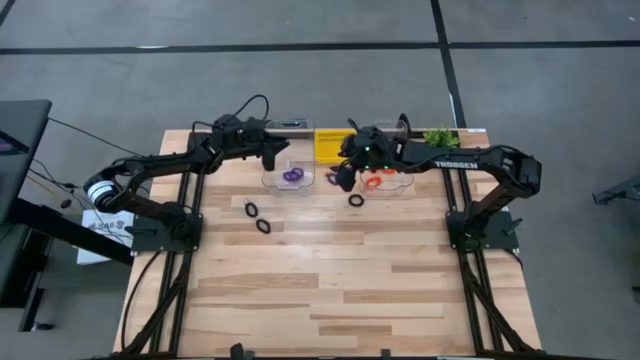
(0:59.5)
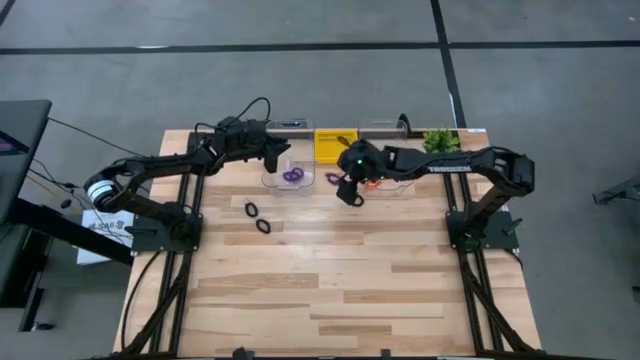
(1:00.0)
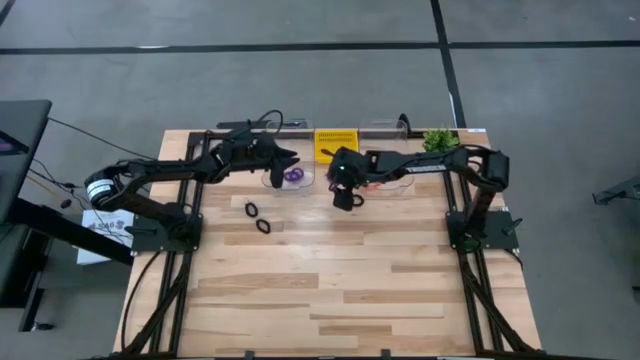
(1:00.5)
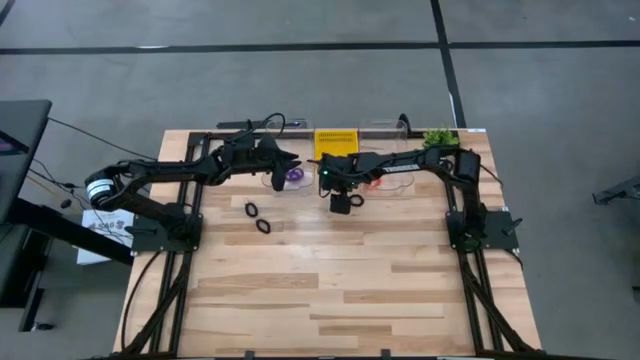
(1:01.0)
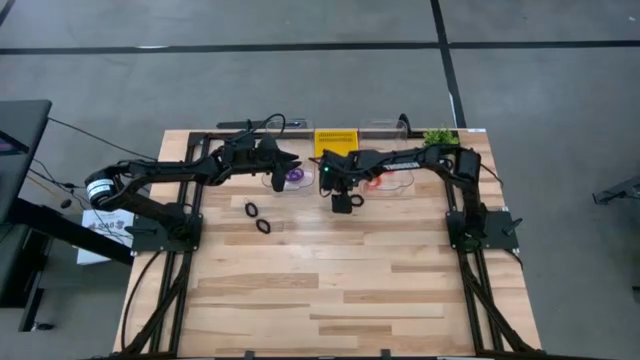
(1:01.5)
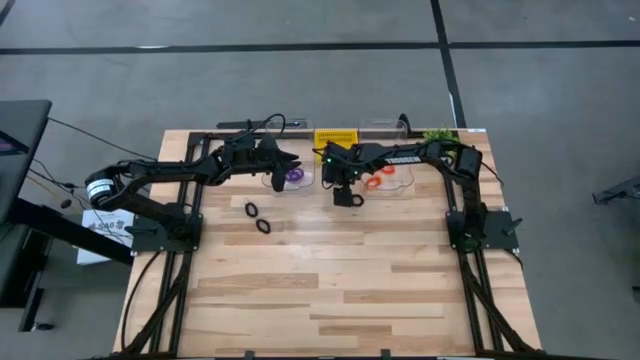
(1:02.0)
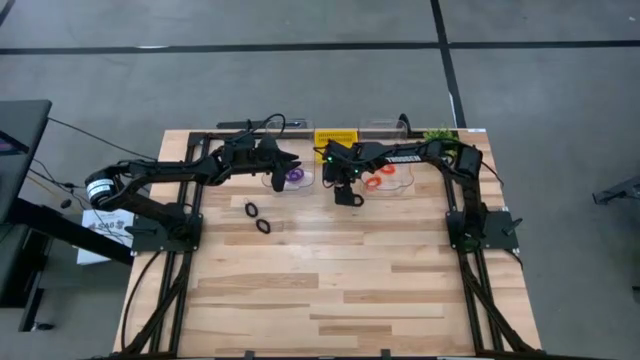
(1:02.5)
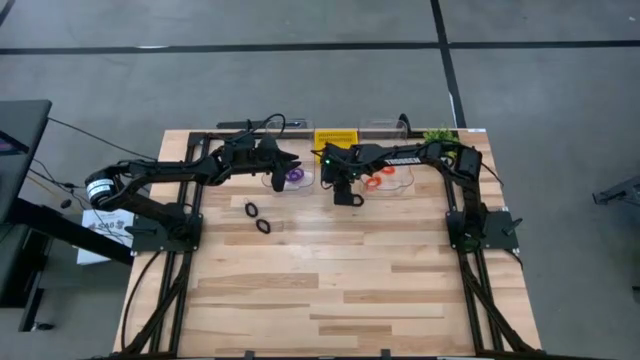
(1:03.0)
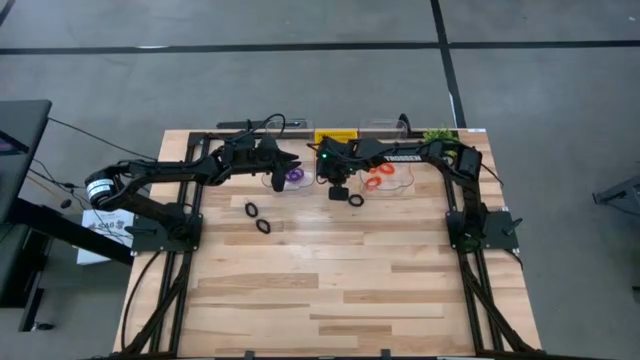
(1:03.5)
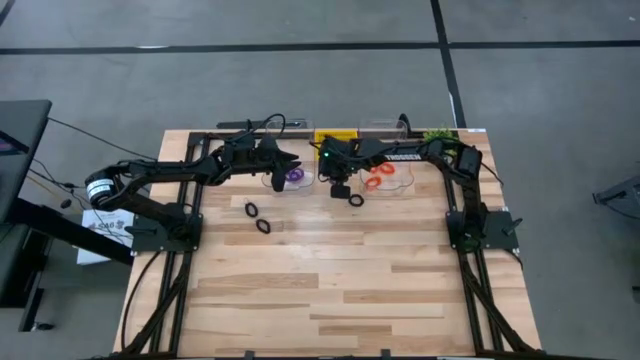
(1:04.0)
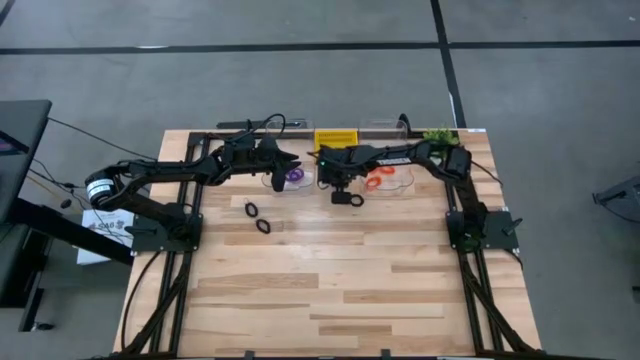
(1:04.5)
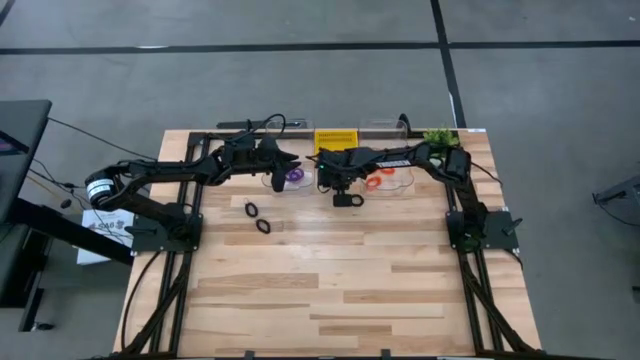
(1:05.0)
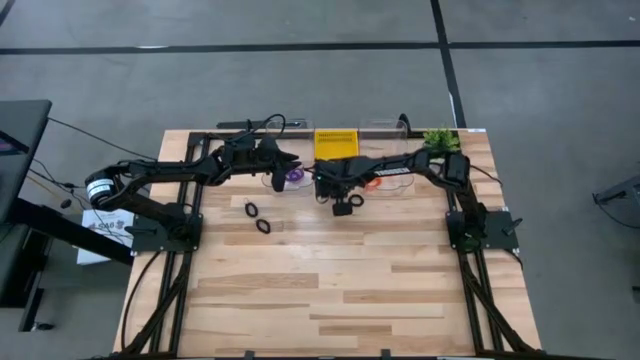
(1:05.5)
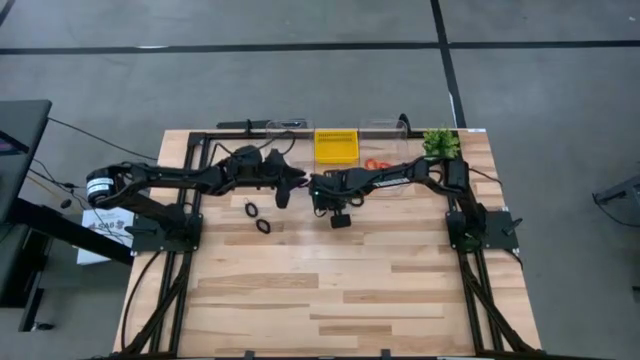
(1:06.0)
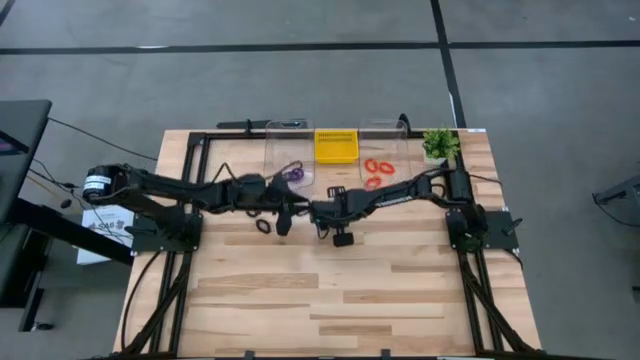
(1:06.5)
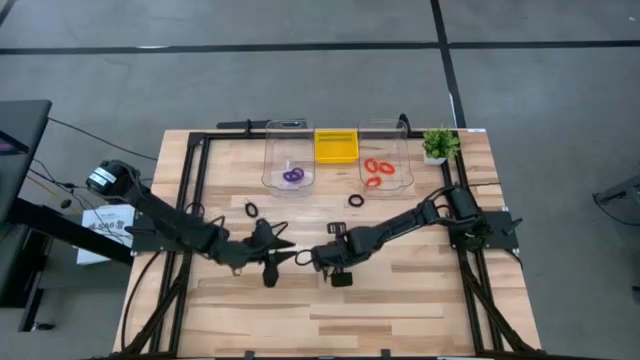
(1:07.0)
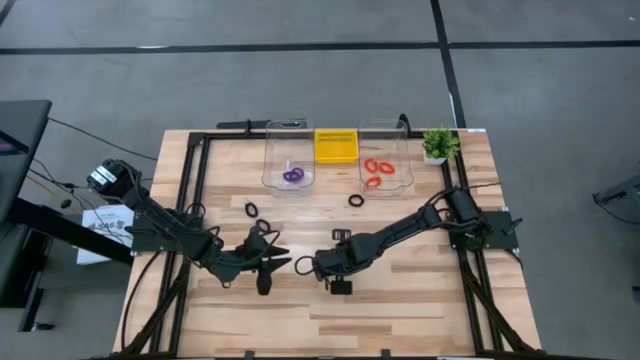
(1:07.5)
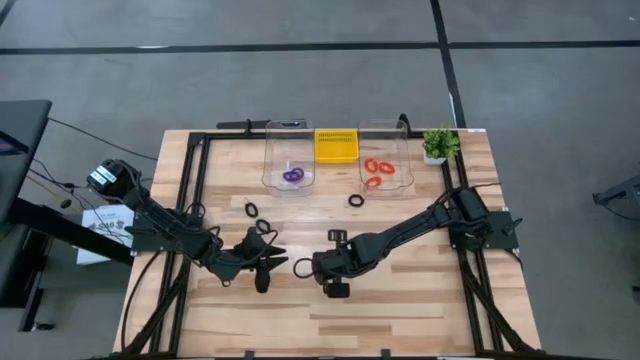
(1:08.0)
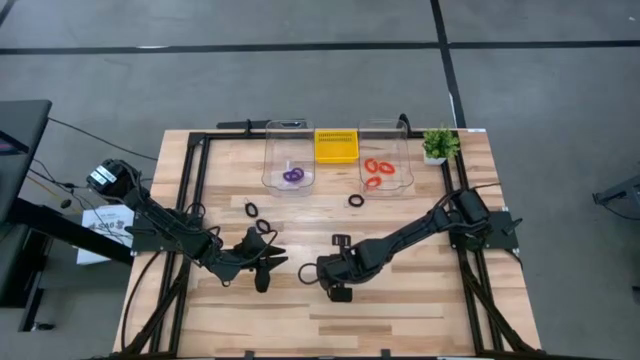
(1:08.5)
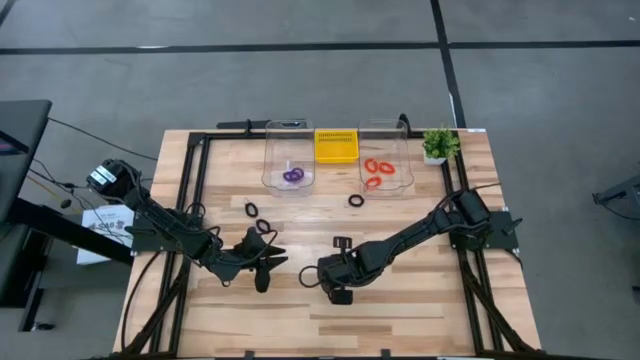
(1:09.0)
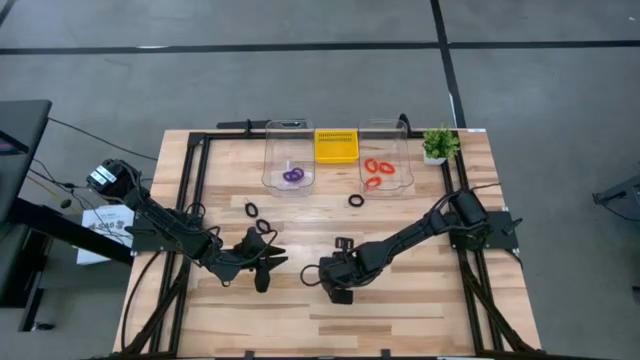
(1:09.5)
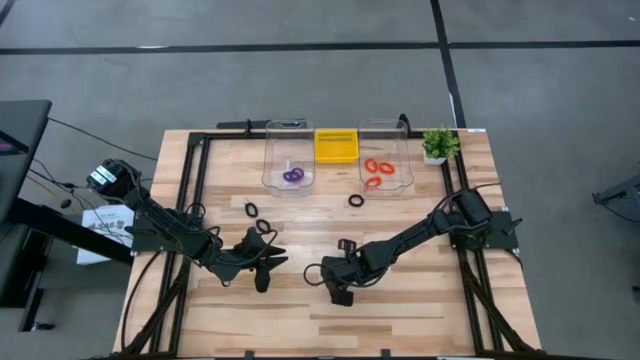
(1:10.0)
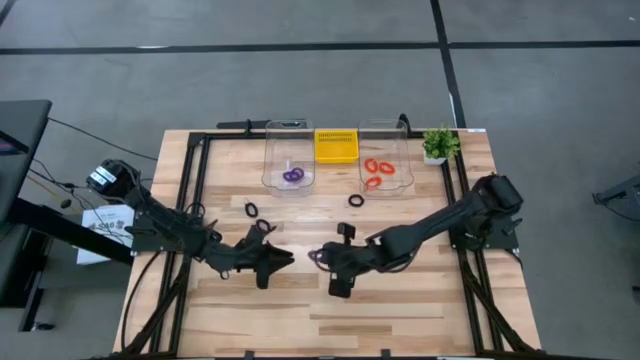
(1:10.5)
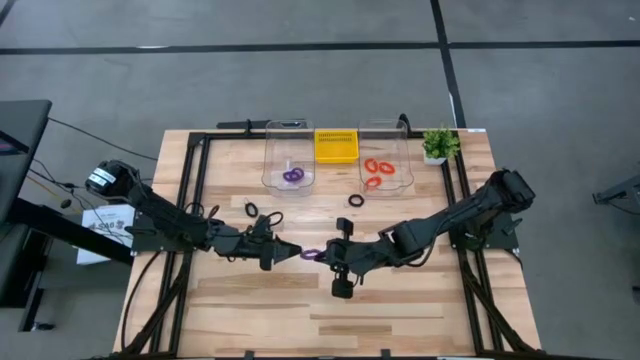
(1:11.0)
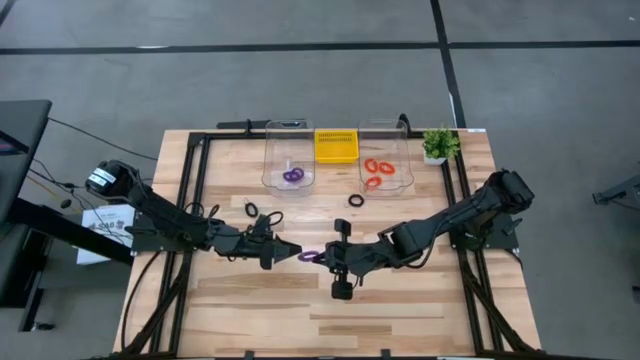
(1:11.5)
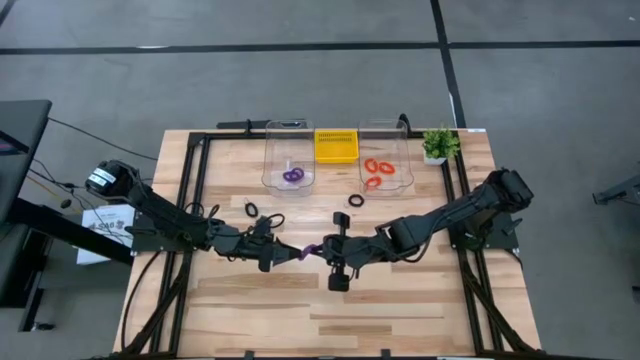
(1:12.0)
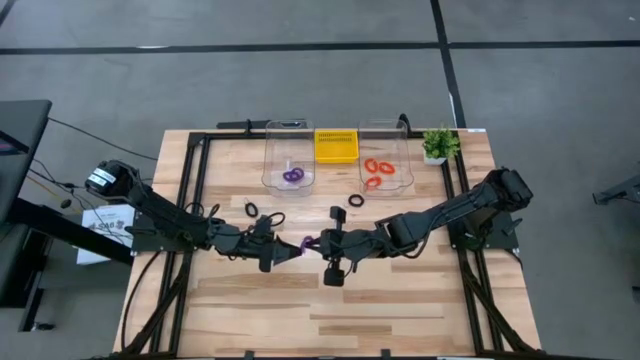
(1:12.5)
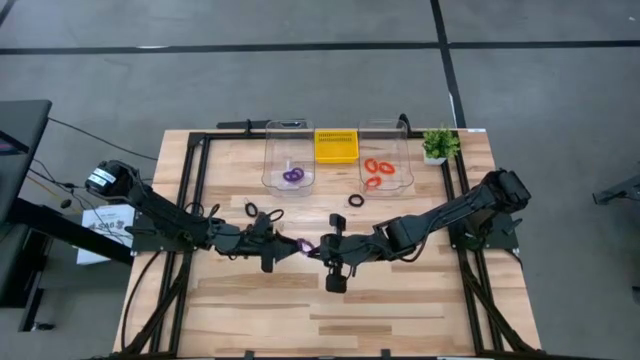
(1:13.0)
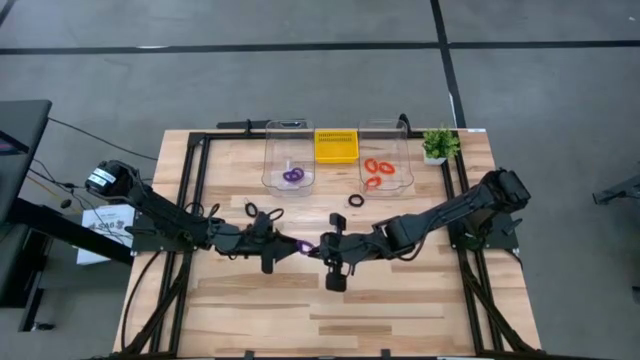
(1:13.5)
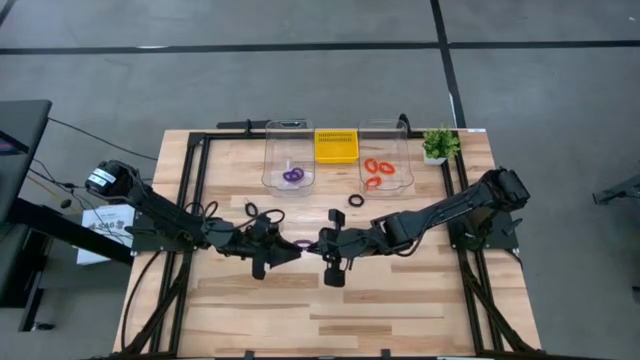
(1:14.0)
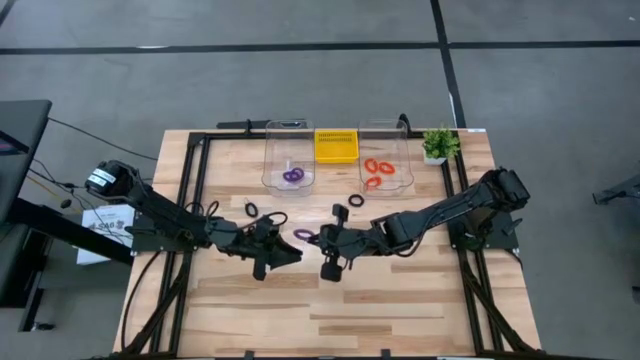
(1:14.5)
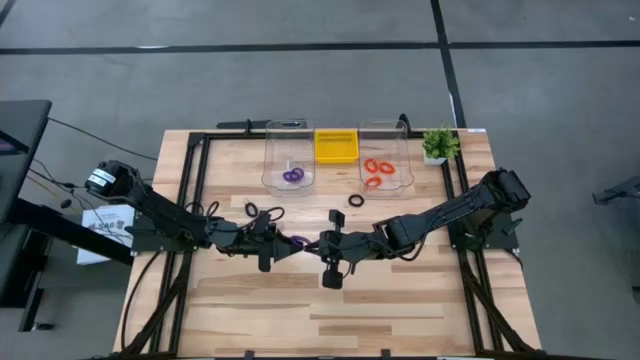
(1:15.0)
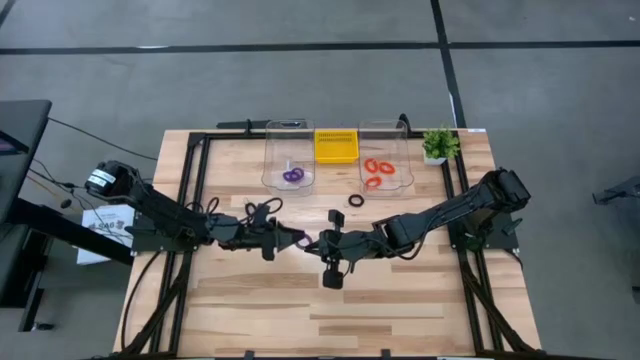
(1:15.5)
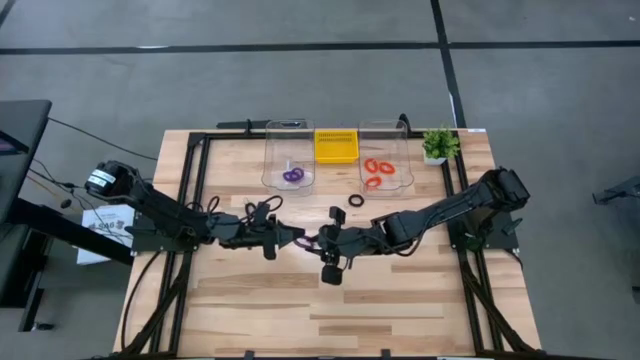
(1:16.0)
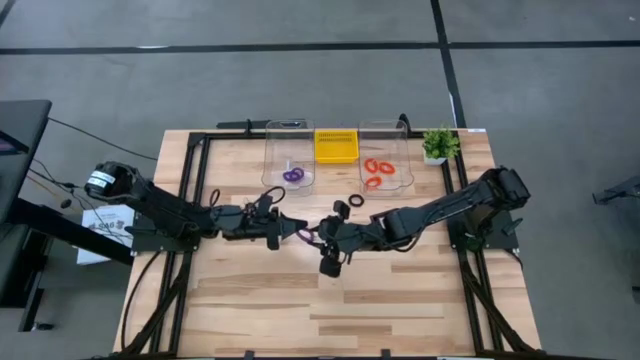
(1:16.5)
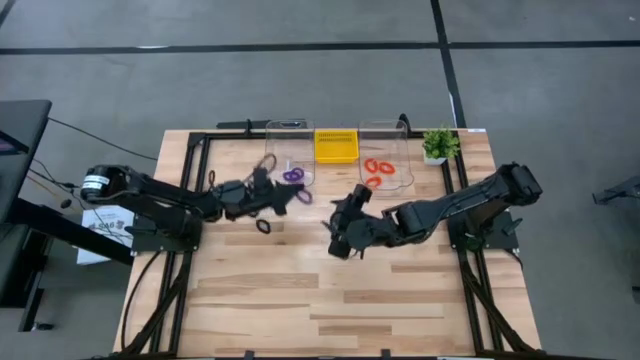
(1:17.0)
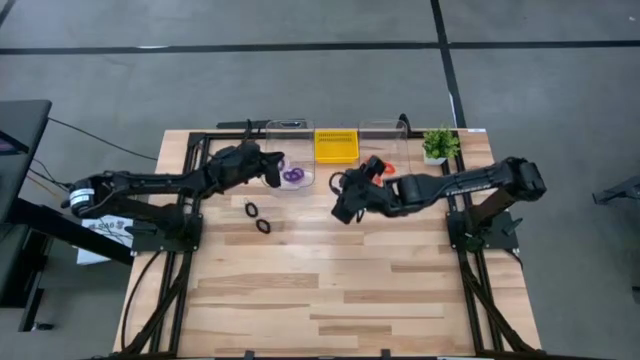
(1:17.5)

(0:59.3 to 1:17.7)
Task: Sort spring keychains
Put the purple spring keychain into the left transparent bin

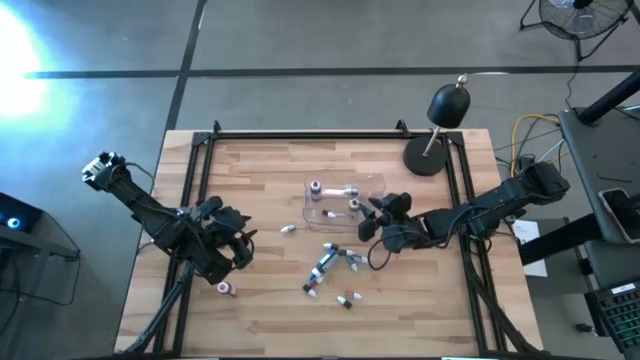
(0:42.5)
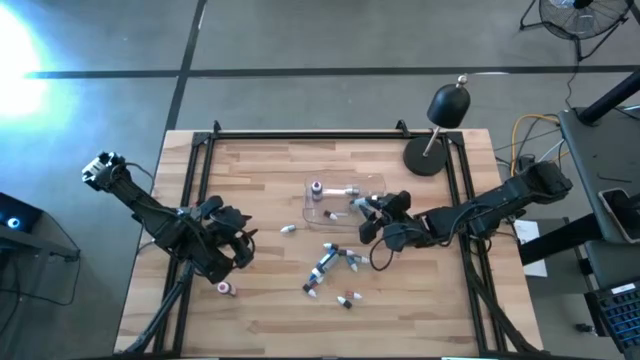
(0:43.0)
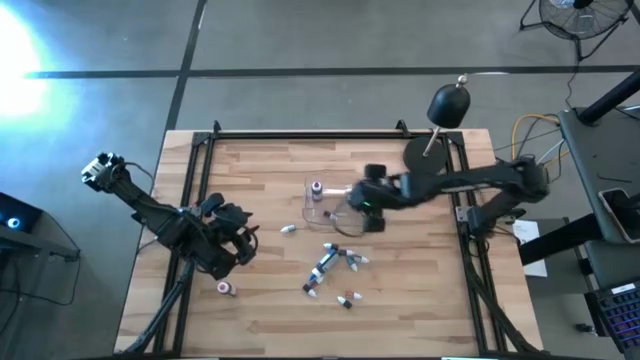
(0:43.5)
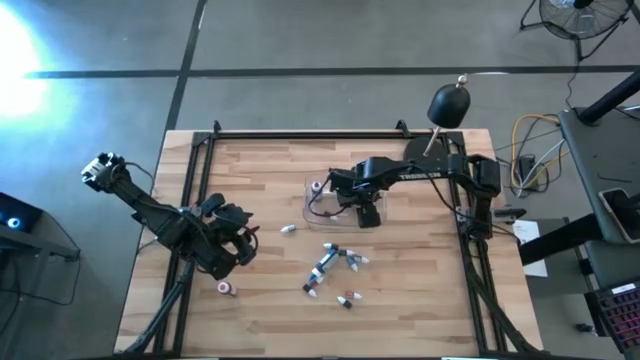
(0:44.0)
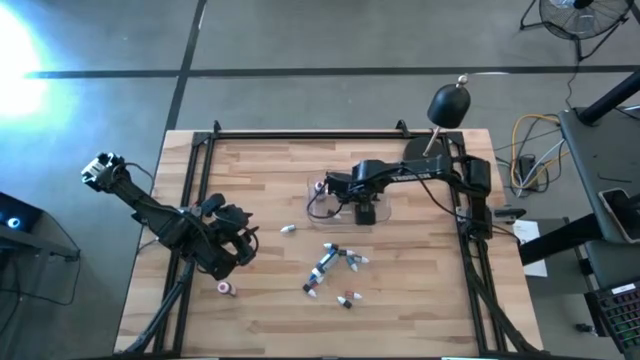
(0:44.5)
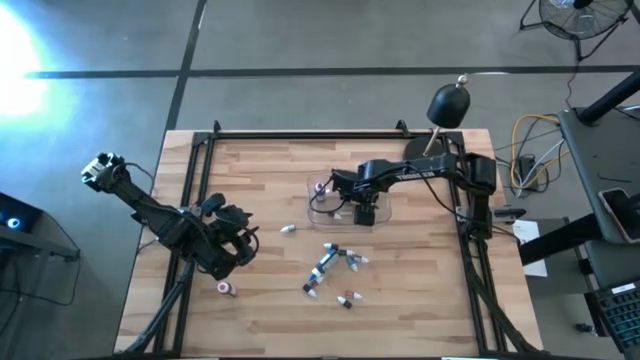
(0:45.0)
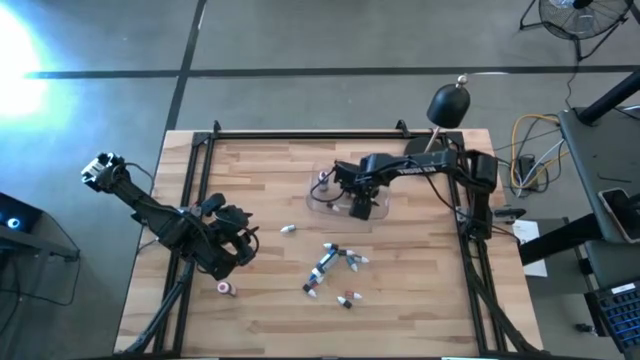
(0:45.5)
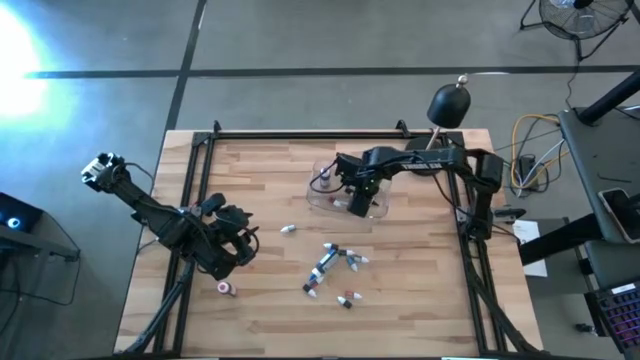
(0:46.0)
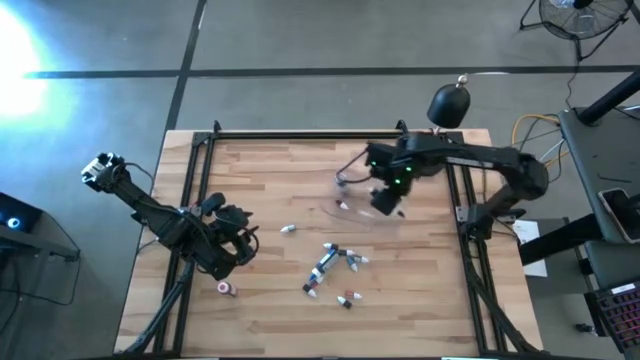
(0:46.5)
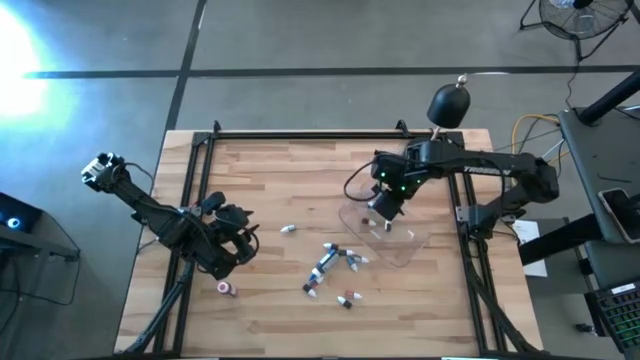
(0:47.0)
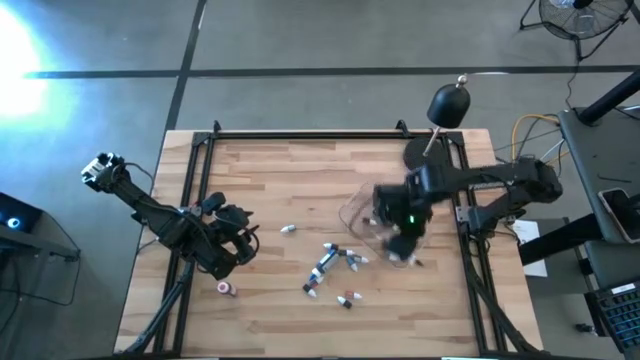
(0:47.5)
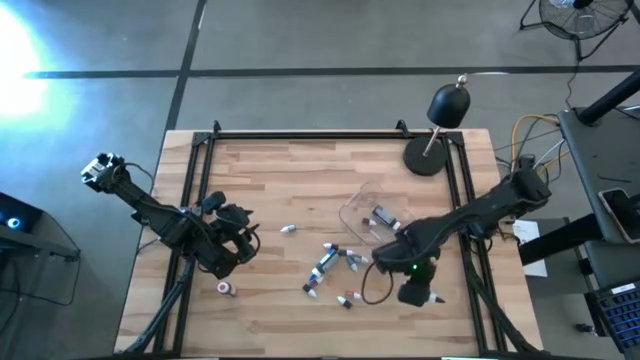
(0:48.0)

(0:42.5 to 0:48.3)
Task: Pick & Place food coloring
Remove the large black food coloring bottle from the transparent bin
